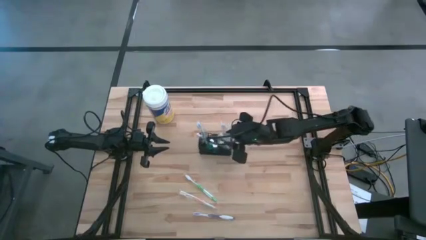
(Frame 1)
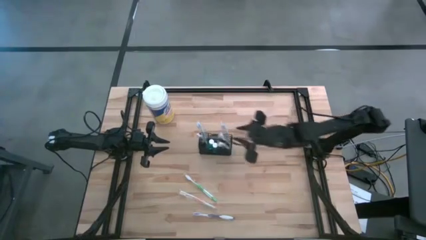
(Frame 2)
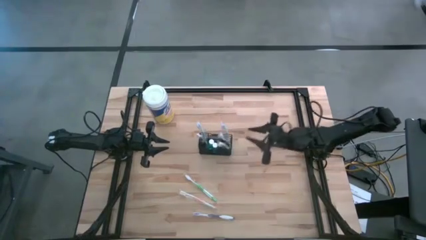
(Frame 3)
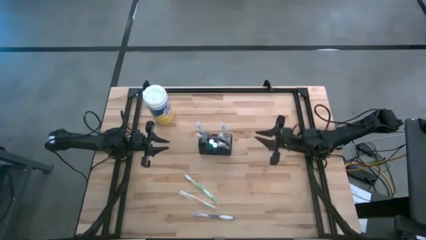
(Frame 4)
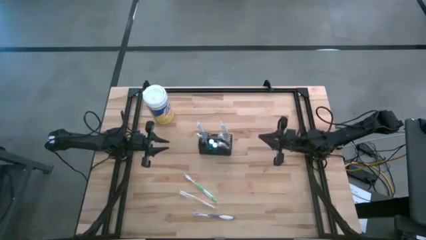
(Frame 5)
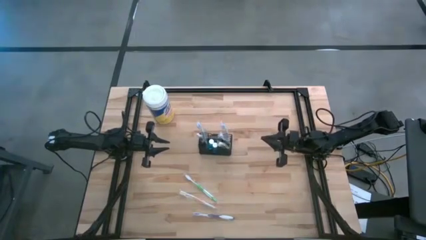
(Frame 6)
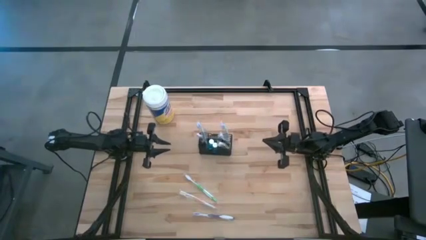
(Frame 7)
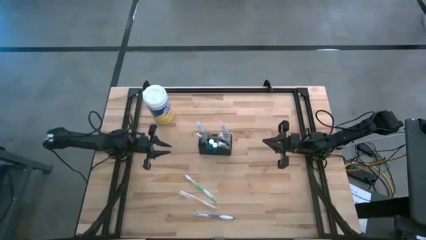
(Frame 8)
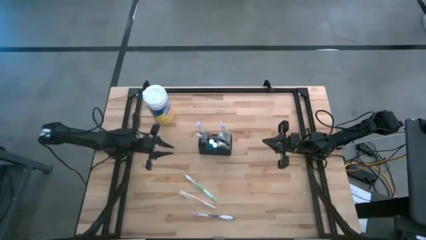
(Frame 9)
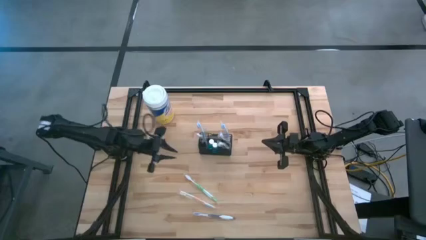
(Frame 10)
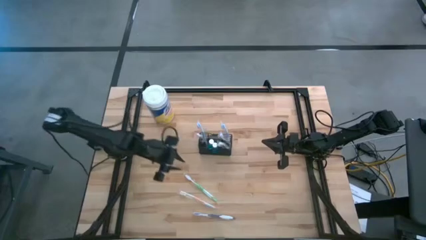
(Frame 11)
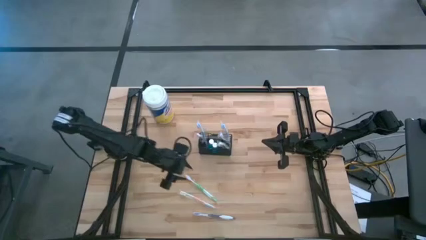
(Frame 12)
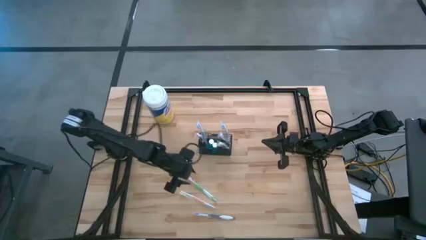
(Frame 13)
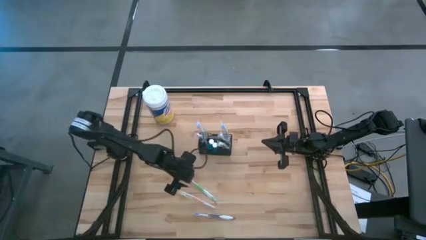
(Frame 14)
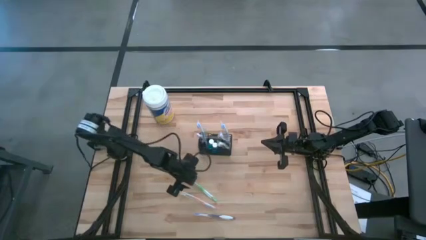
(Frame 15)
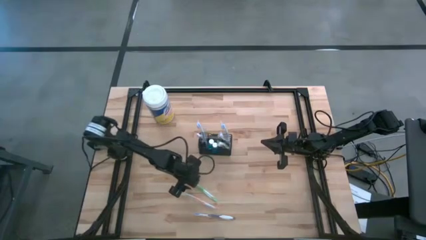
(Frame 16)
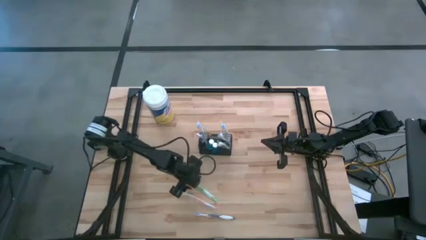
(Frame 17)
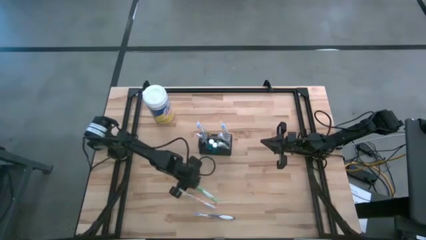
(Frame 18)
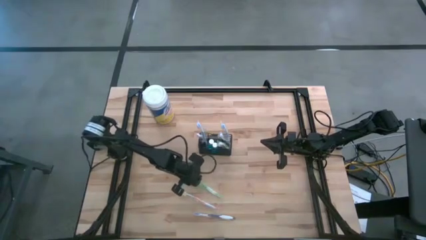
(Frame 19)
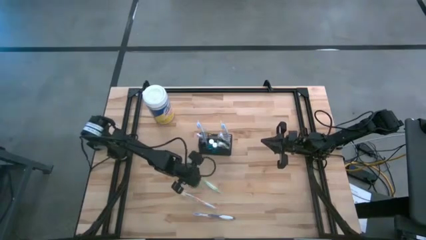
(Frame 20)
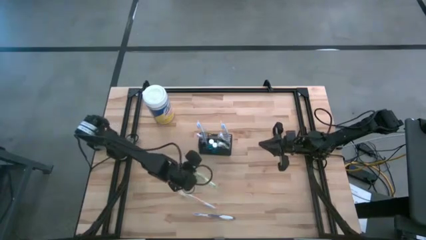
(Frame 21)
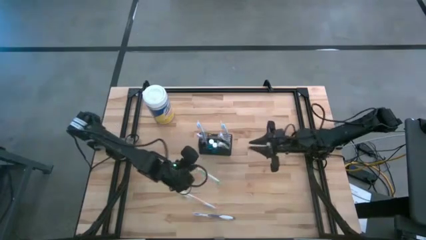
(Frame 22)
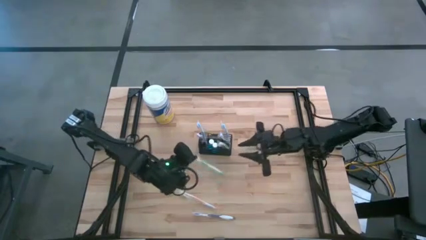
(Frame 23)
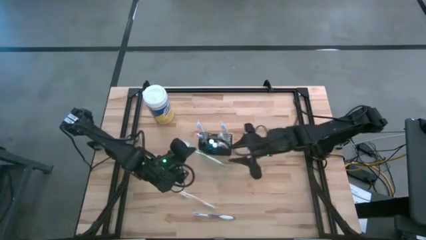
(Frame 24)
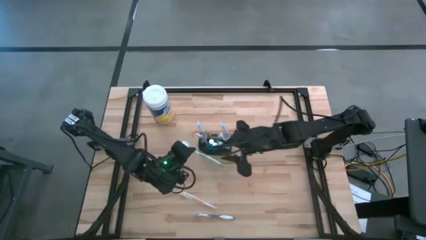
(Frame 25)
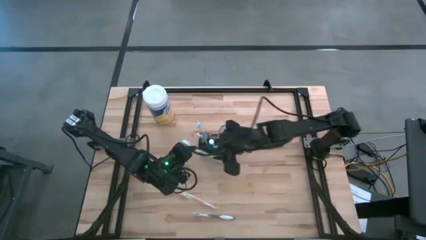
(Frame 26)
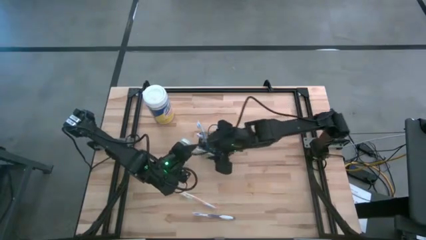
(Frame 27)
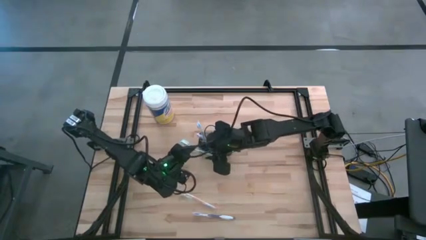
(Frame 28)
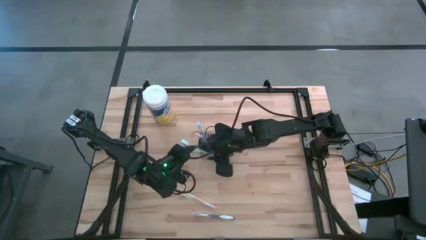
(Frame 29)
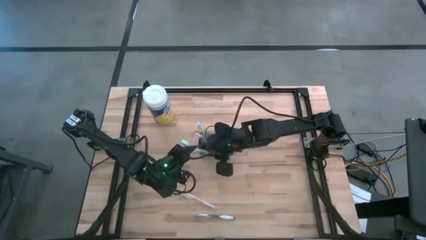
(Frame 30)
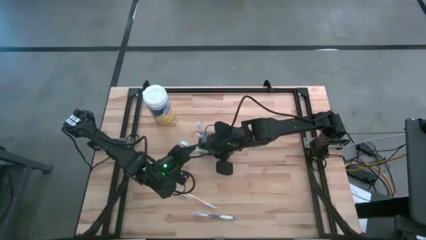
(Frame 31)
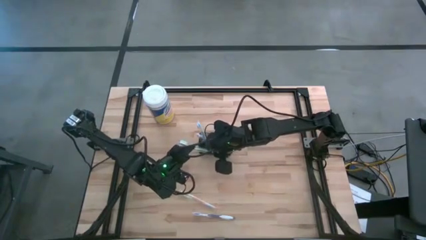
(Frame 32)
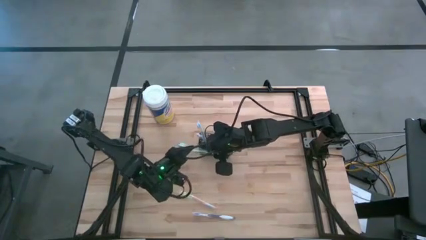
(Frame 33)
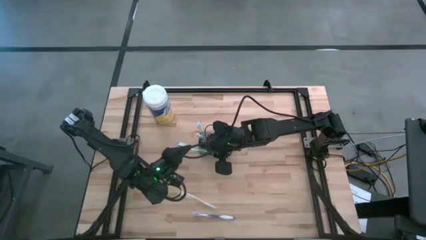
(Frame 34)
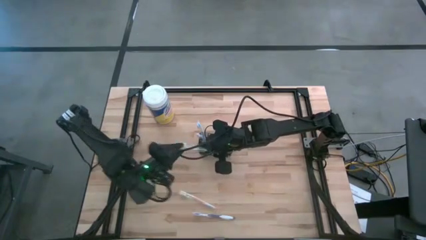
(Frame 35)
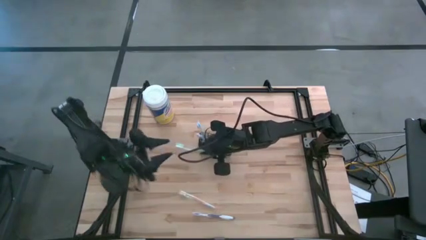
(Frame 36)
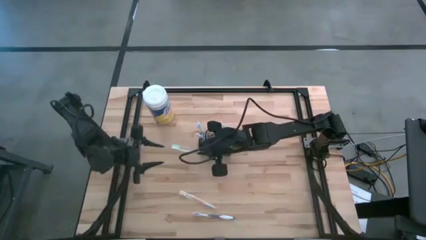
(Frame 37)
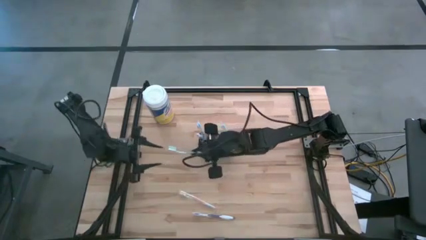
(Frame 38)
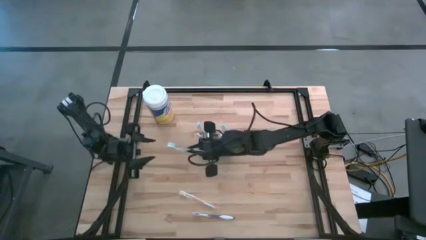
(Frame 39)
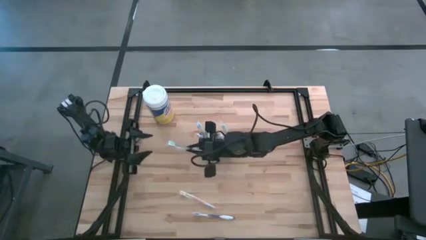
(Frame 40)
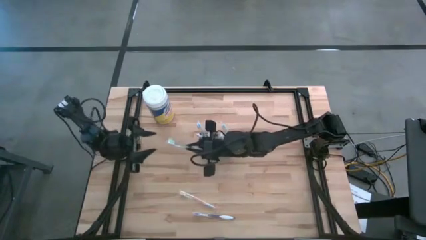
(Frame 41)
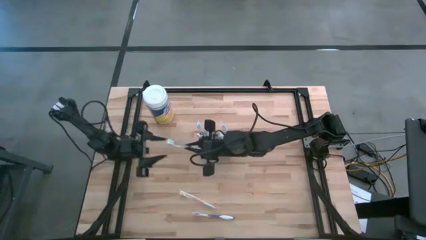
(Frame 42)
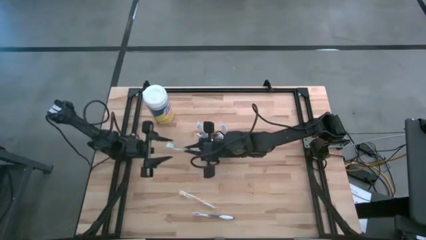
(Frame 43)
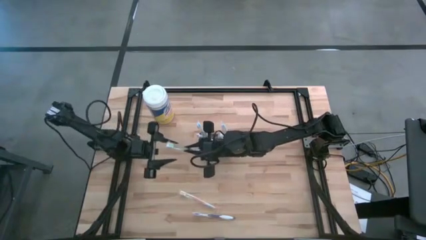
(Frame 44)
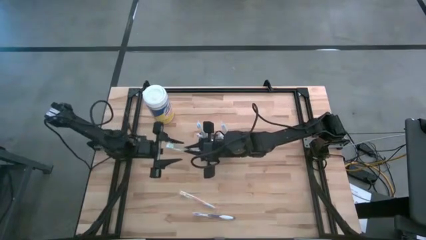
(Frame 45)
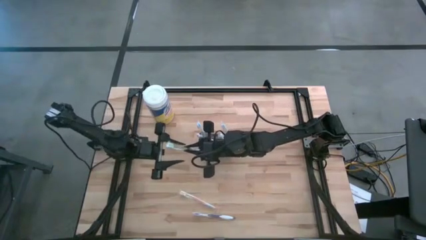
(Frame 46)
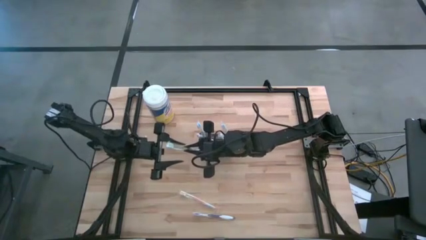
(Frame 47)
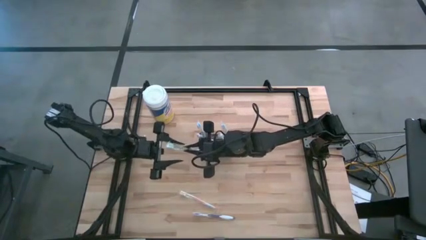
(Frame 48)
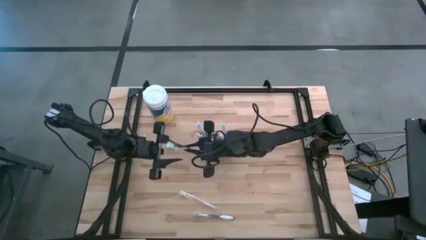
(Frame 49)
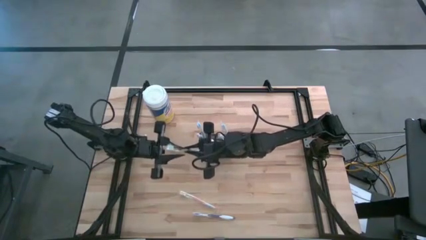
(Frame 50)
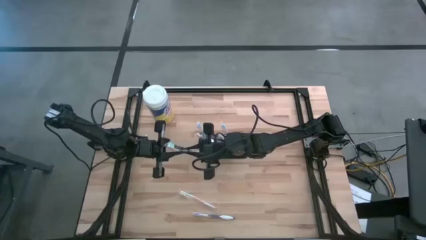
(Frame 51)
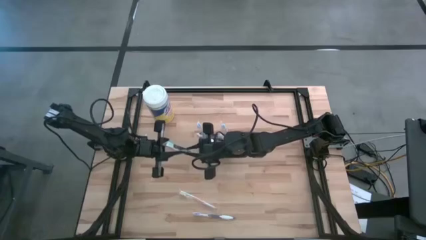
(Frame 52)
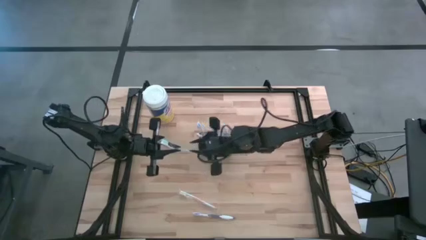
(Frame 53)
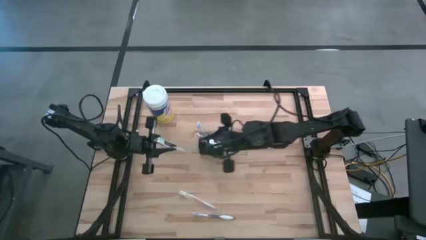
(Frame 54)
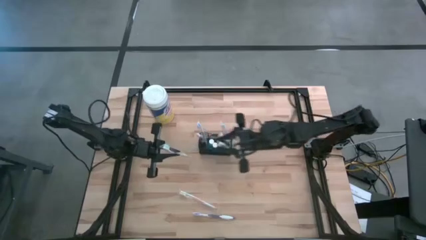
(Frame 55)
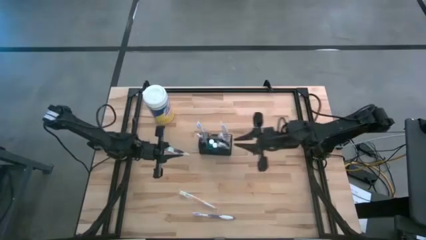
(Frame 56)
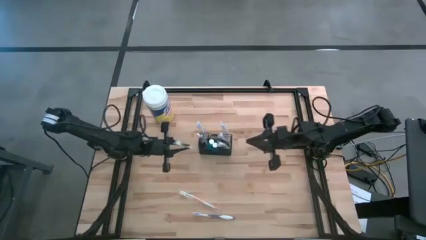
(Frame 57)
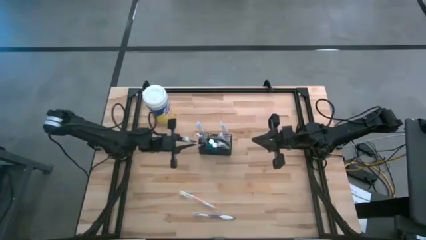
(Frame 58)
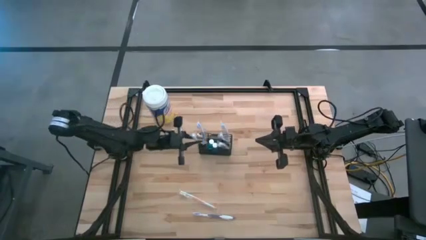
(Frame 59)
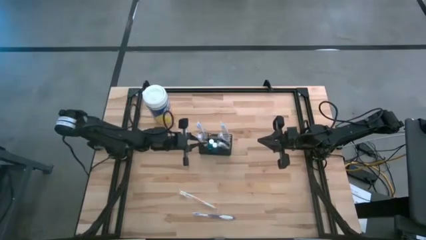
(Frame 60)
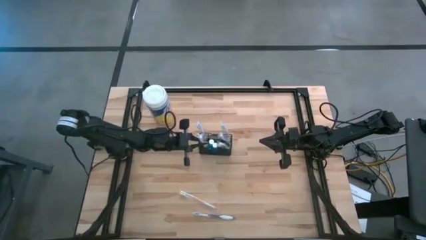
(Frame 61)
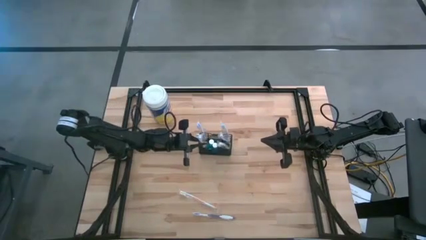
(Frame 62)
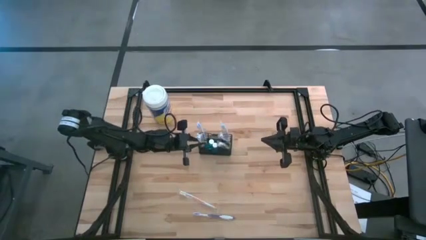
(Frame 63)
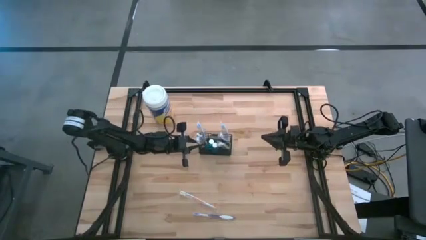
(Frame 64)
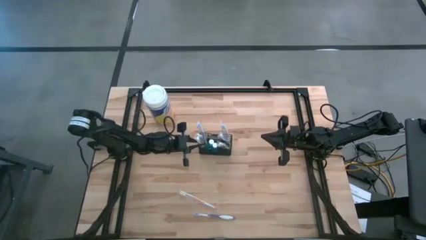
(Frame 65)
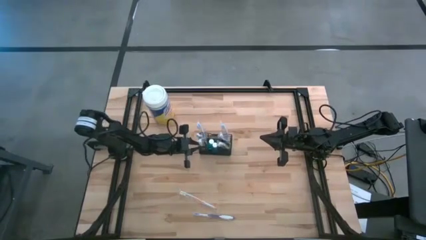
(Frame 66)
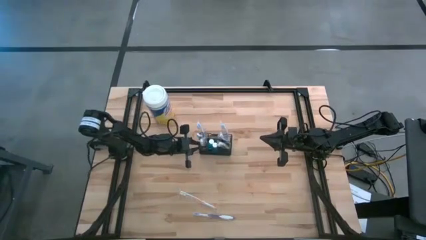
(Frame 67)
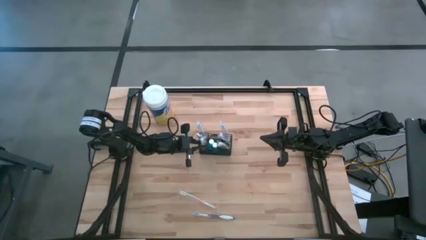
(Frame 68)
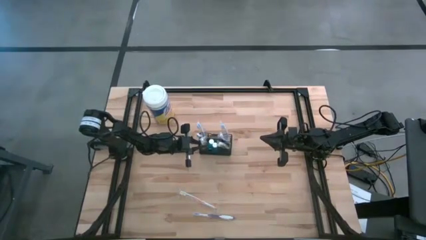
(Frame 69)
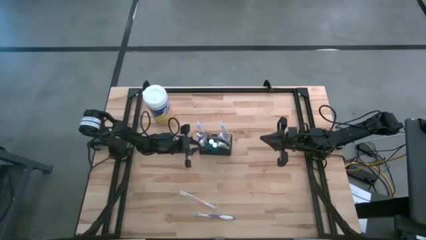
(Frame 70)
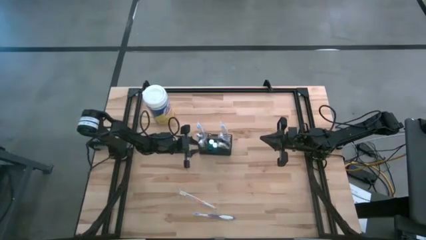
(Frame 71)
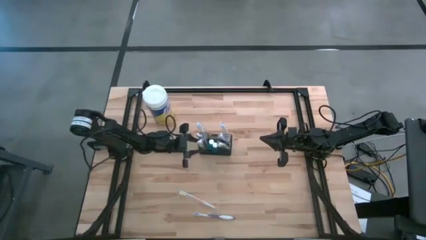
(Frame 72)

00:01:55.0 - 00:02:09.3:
Task: Pick & Place toothbrushing station
Put the green toothbrush into the mesh organizer

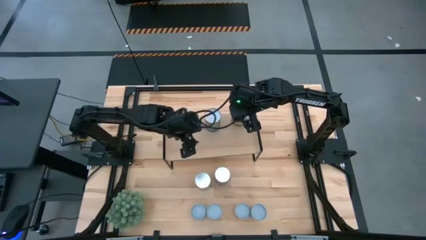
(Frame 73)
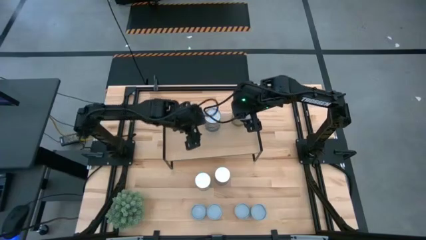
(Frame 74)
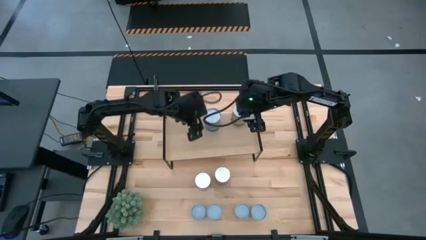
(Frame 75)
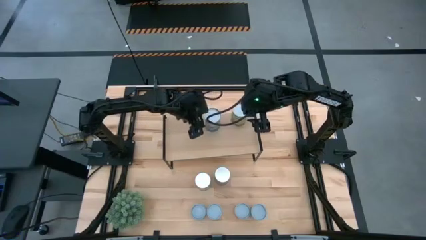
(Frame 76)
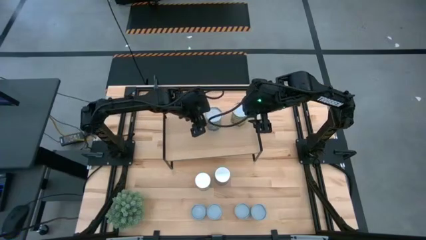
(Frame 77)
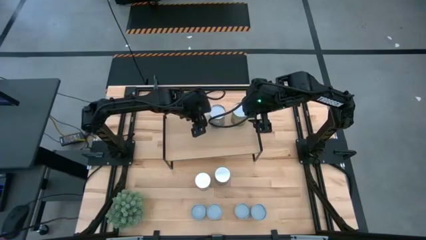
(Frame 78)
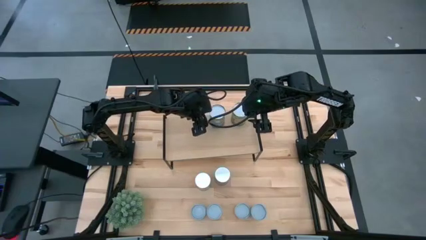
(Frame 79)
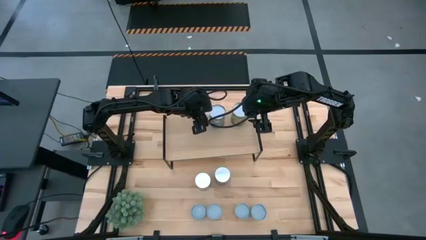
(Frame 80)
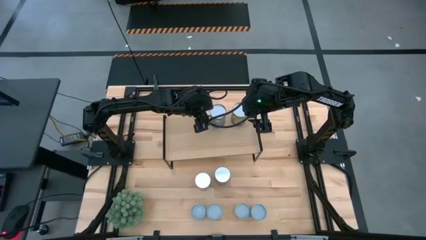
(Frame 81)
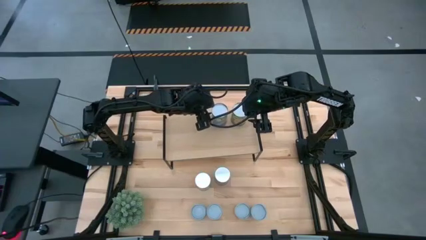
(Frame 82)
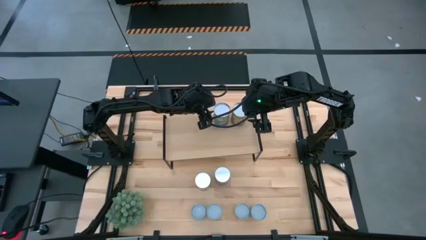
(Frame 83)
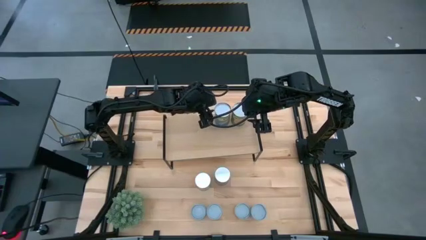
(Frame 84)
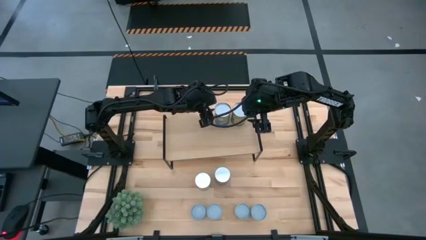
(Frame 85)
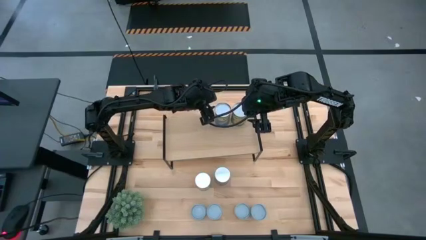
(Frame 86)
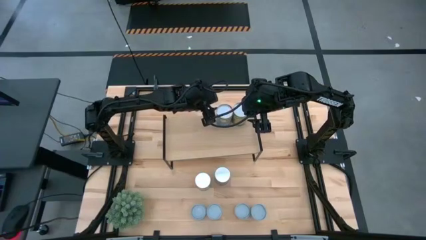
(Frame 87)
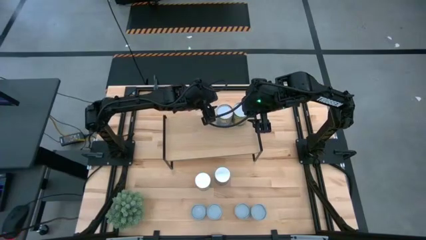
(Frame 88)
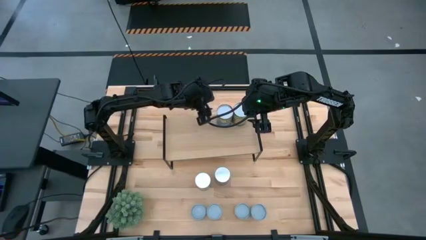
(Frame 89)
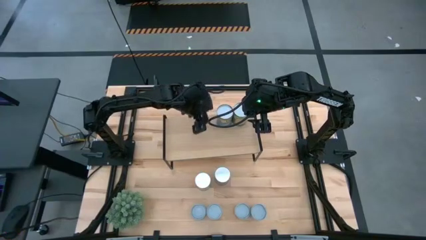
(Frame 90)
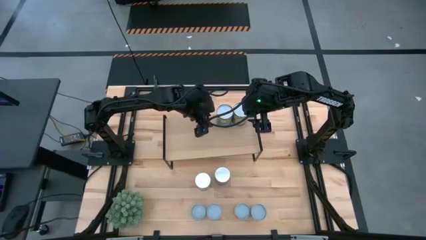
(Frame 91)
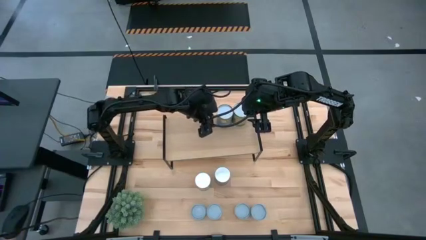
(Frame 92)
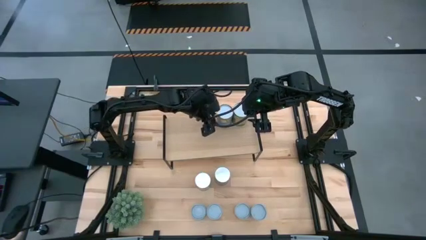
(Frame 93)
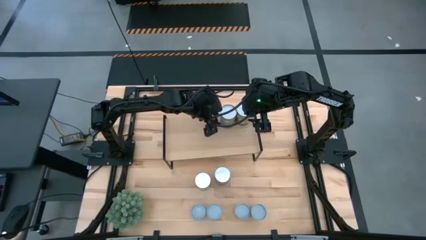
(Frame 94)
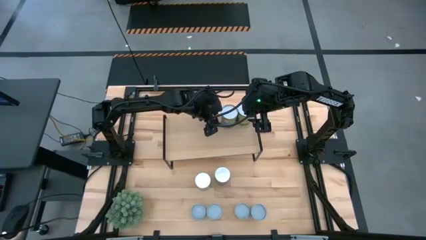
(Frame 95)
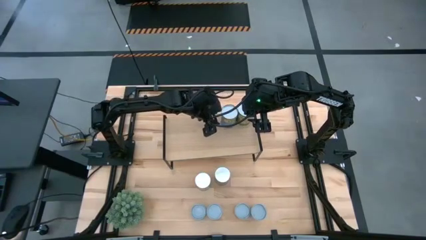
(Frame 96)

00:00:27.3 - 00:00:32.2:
Task: Pick and place cans onto a shelf
Adjust the canned peas on the shelf
